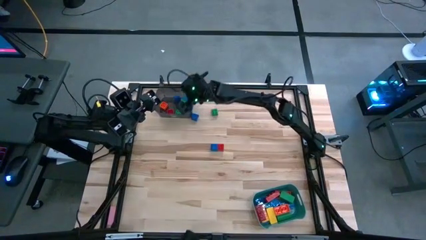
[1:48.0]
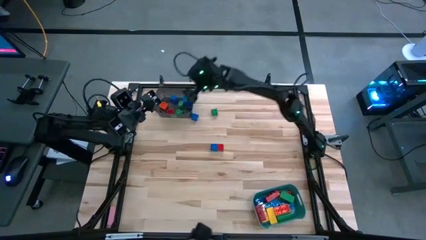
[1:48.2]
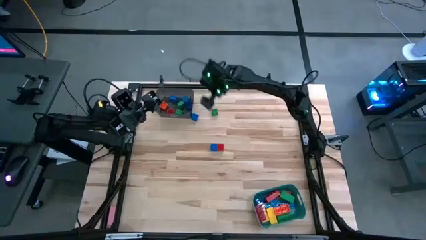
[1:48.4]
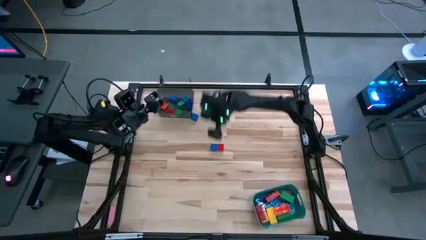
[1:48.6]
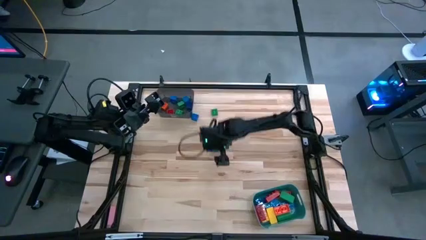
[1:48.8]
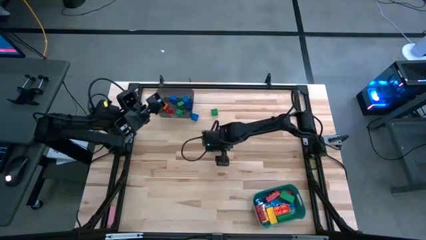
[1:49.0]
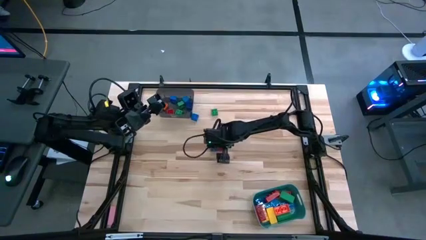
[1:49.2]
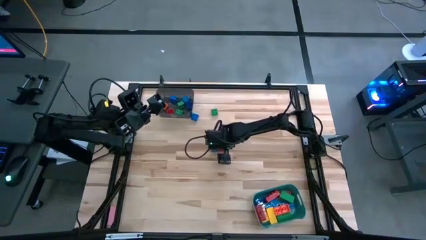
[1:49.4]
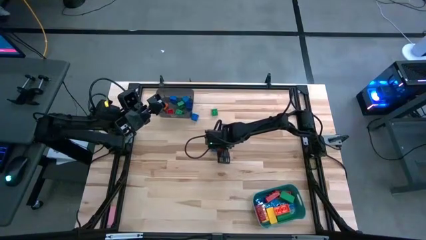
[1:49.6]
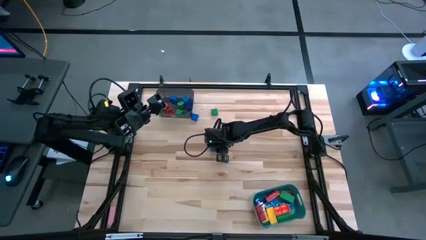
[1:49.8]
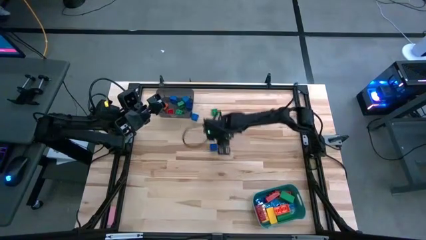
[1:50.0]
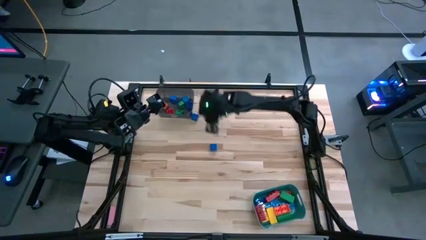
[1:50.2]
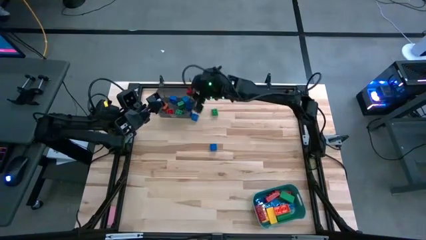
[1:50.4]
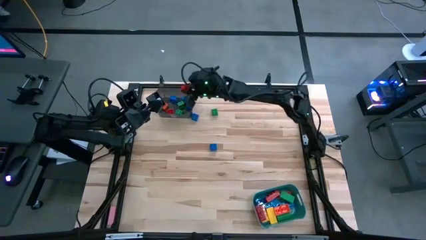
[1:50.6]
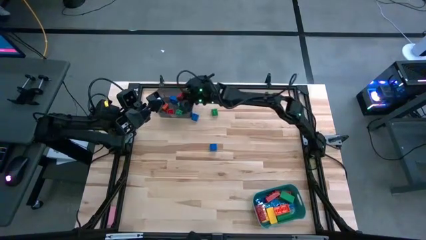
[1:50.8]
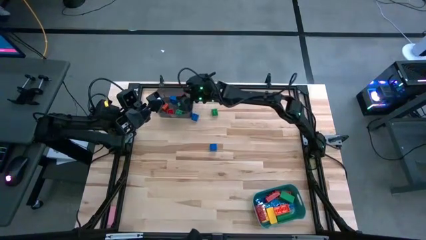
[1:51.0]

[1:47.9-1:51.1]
Task: Sort blocks by size
Put the red game piece into the black bin

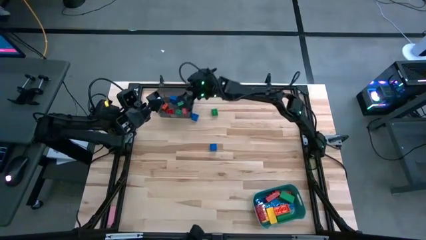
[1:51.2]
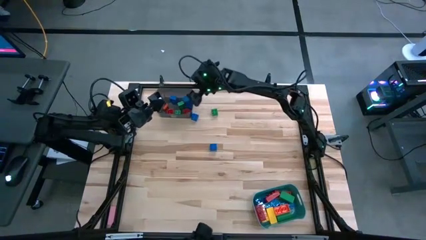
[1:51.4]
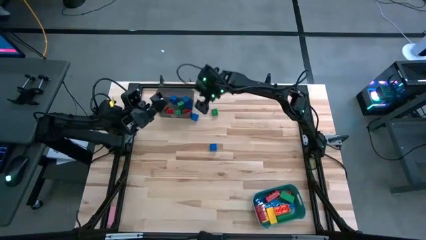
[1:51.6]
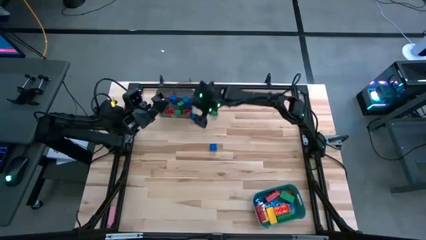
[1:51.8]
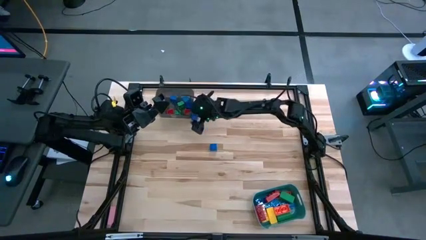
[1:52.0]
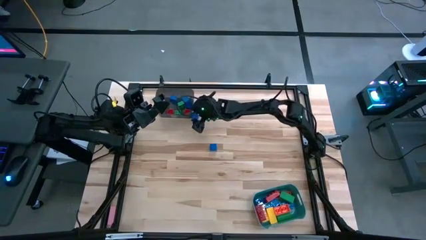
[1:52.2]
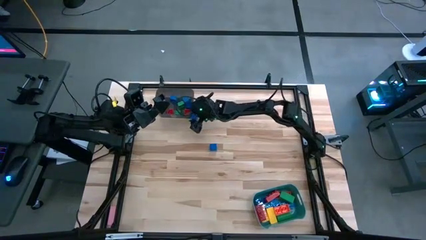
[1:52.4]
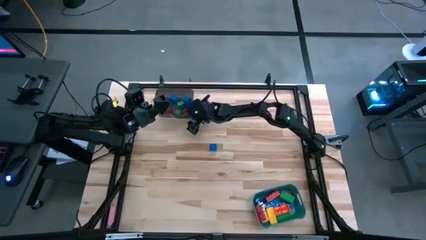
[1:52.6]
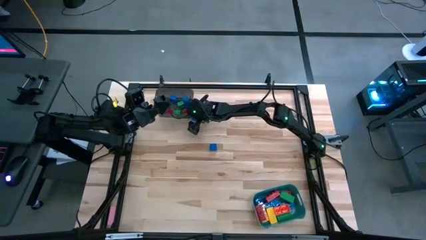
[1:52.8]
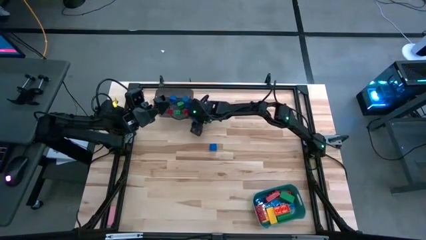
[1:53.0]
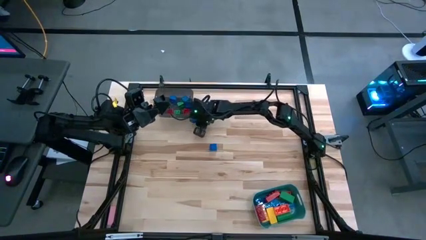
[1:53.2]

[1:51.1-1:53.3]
Put the top blue game piece into the black bin

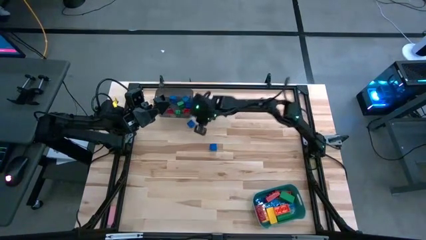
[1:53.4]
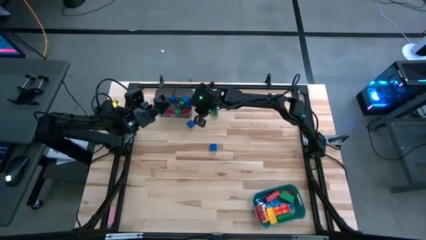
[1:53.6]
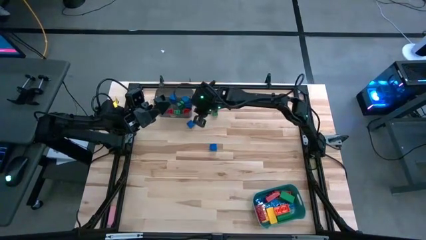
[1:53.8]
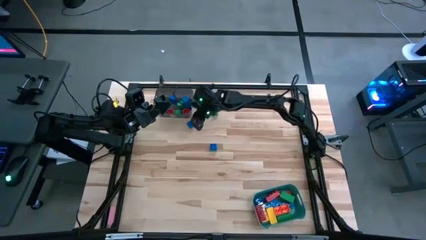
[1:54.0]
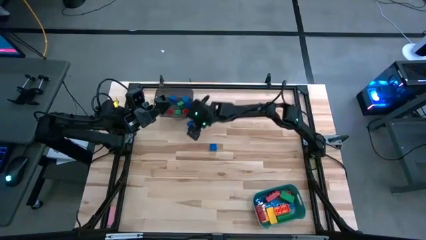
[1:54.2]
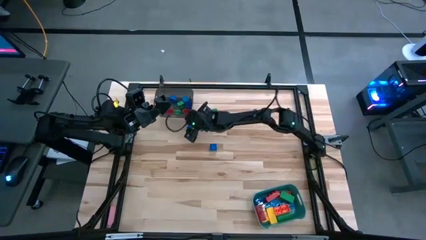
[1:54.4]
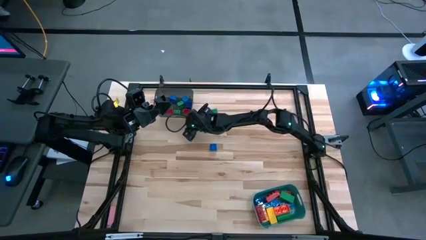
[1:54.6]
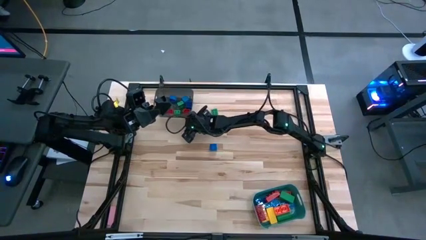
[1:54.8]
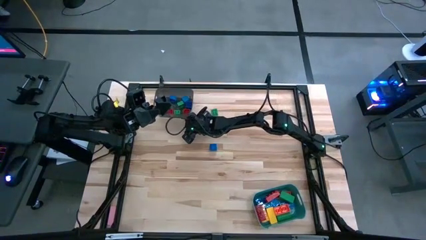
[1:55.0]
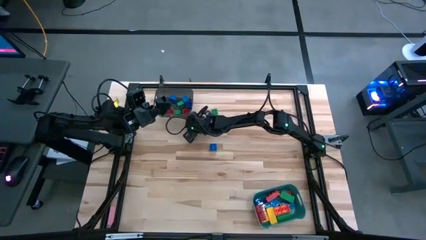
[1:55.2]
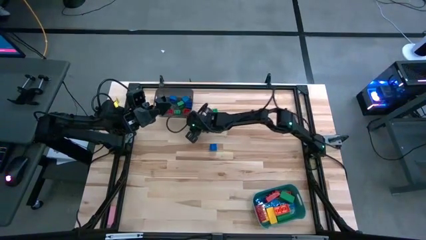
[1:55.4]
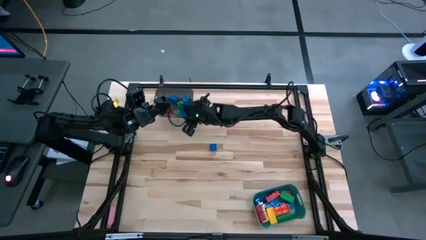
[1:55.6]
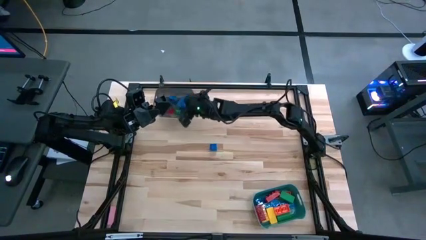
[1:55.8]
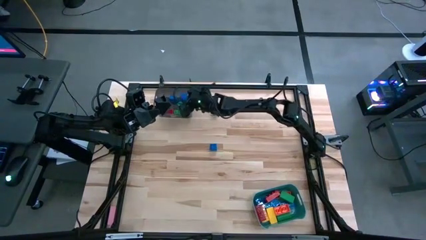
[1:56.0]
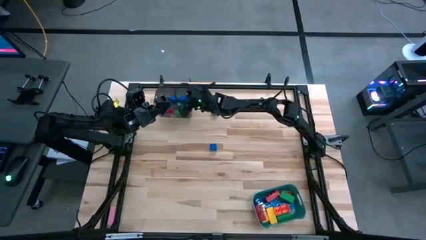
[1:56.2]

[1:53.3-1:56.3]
Put the top blue game piece into the black bin

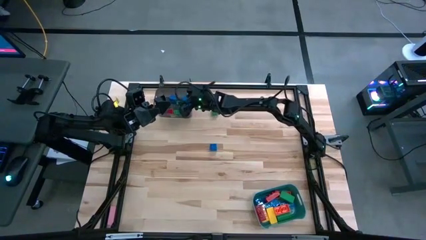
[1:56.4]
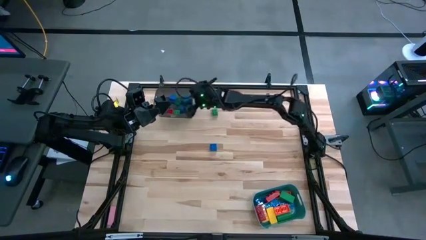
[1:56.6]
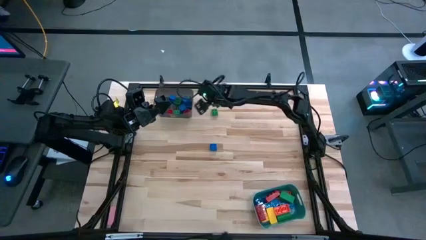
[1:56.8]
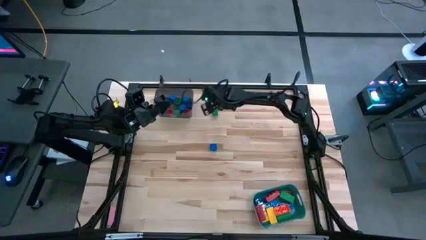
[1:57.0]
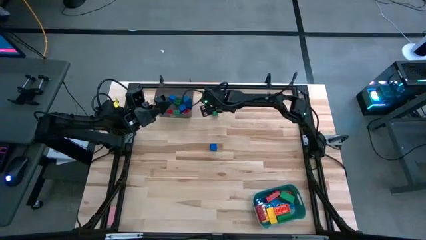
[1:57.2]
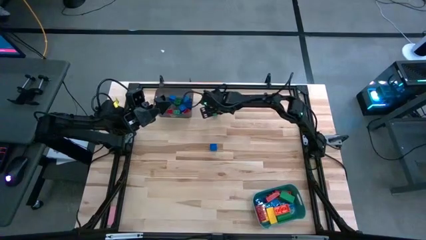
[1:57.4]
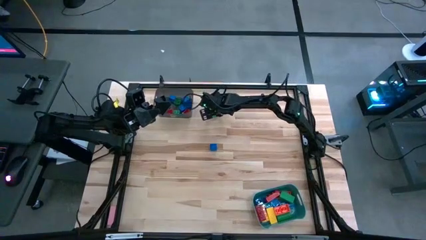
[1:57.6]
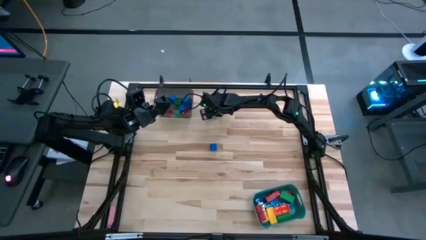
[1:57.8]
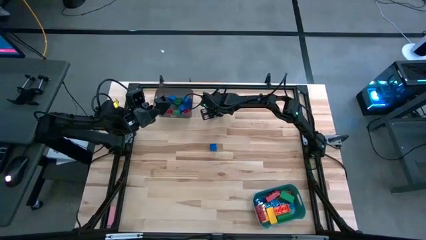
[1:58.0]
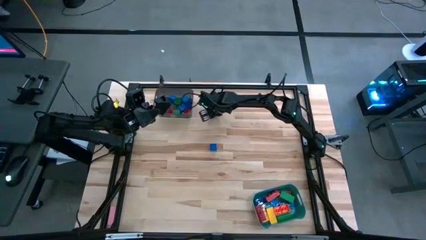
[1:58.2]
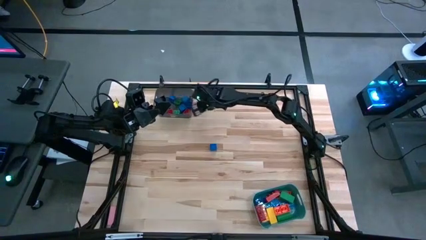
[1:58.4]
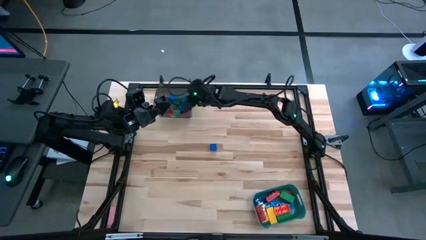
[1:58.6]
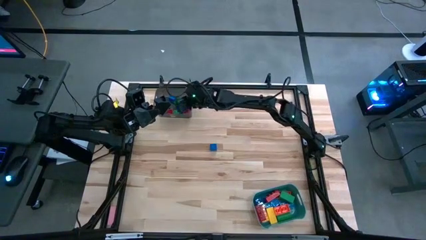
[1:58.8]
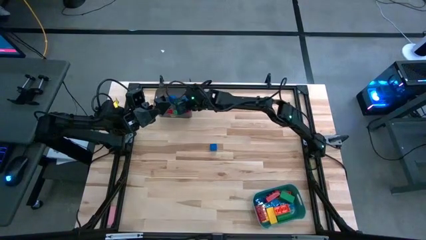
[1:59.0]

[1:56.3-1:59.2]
Put the green game piece into the black bin

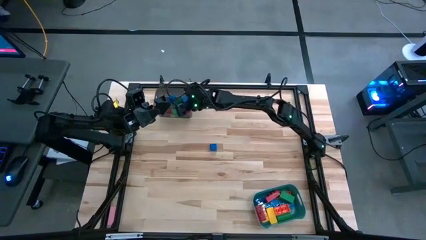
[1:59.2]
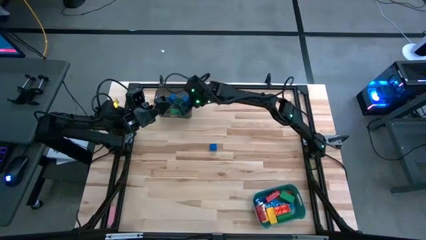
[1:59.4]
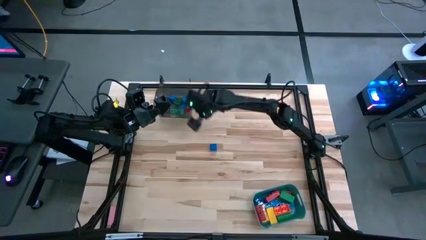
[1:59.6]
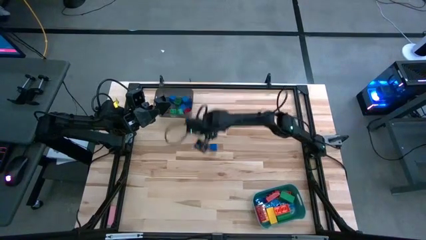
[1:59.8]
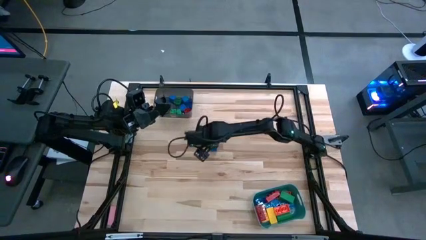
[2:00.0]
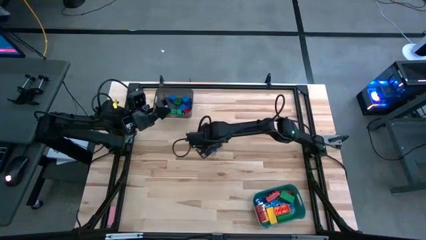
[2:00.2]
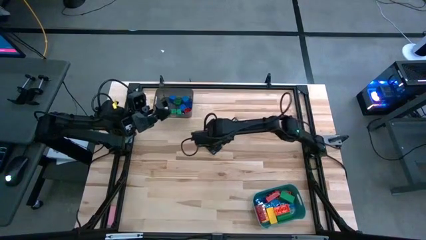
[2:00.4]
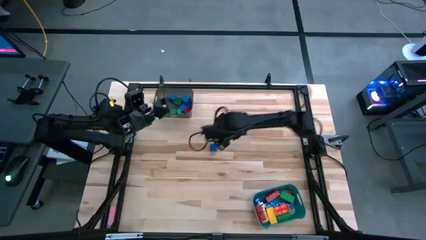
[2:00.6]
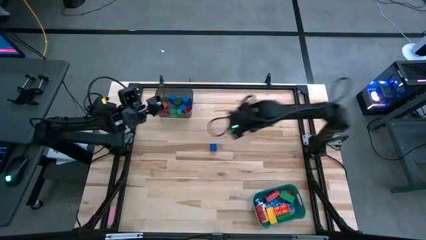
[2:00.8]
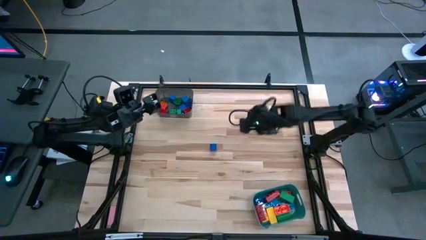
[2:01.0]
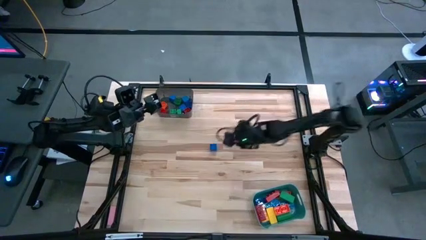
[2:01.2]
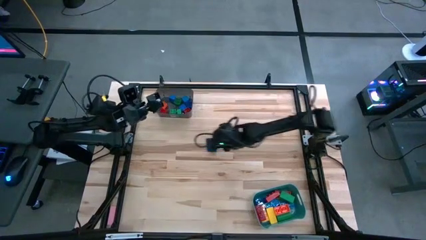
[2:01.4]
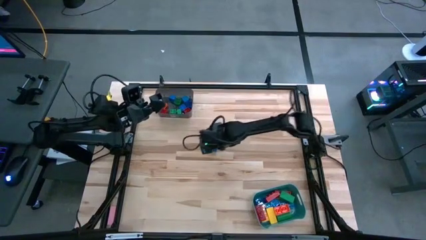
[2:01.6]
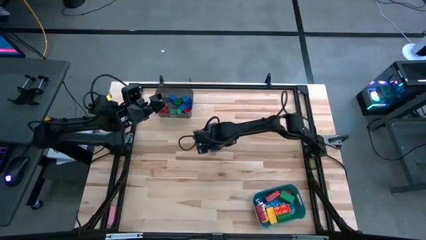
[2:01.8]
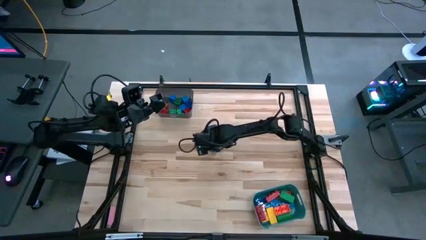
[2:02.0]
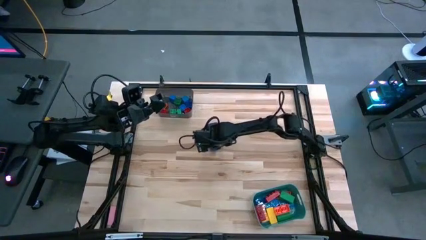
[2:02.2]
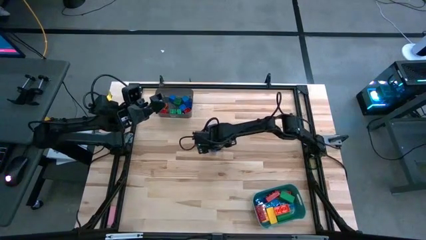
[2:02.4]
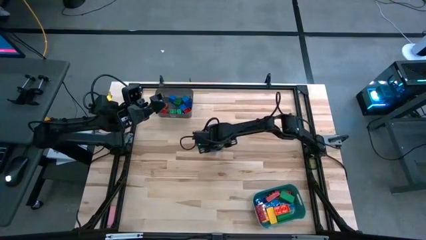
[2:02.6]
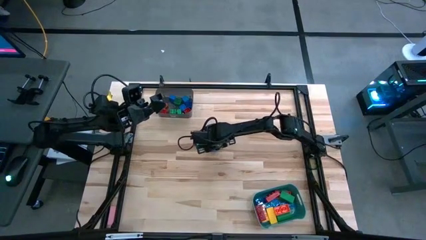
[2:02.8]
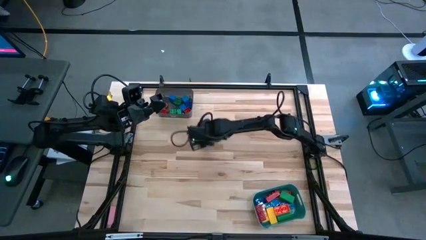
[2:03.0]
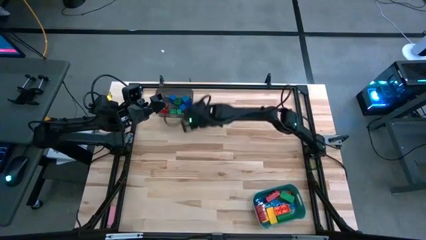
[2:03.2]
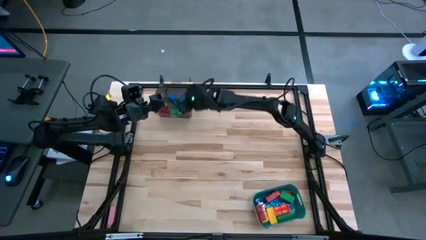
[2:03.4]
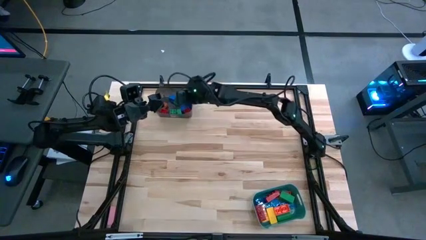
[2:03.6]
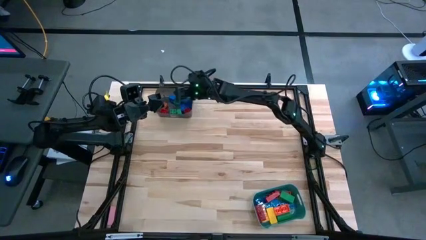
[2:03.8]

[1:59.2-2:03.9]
Put the blue game piece into the black bin

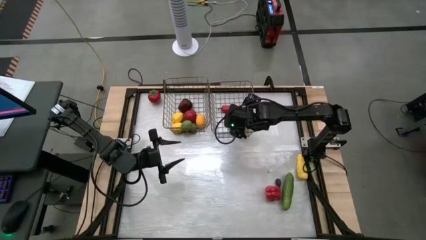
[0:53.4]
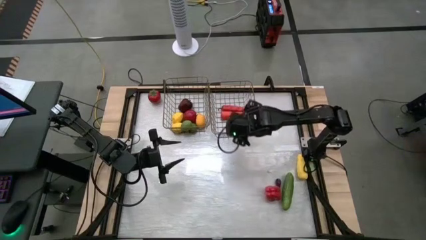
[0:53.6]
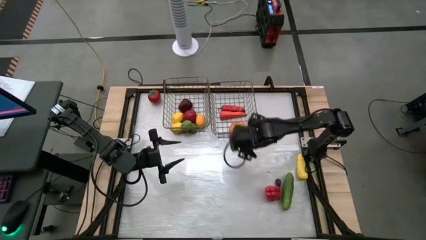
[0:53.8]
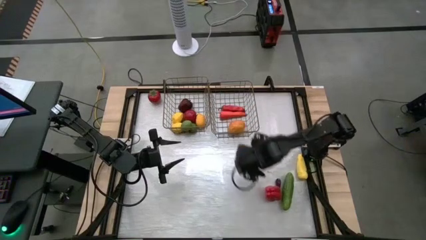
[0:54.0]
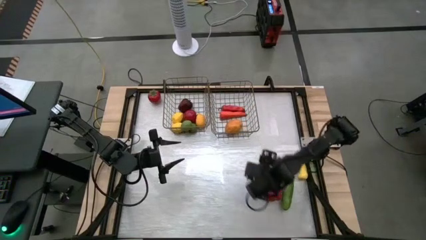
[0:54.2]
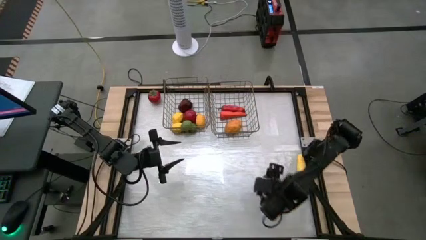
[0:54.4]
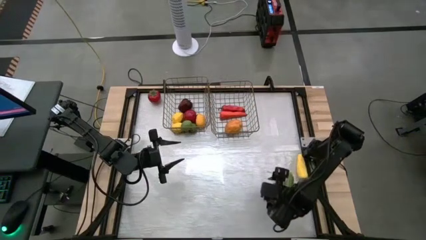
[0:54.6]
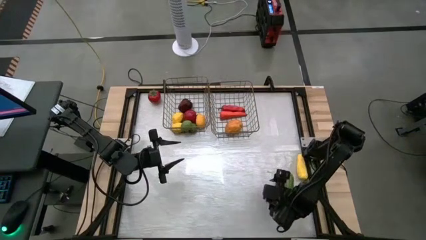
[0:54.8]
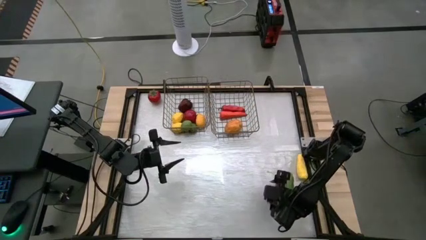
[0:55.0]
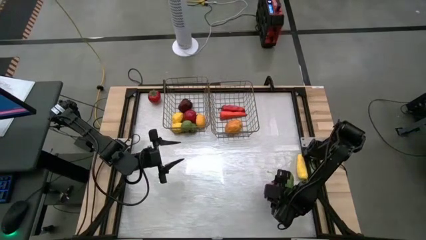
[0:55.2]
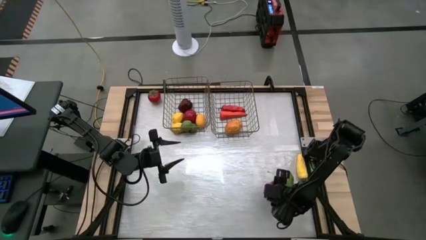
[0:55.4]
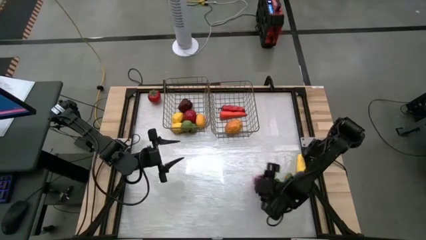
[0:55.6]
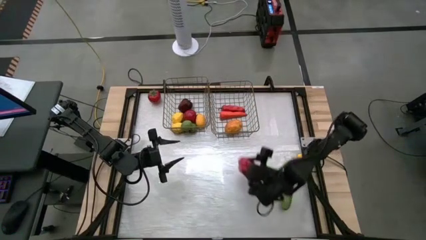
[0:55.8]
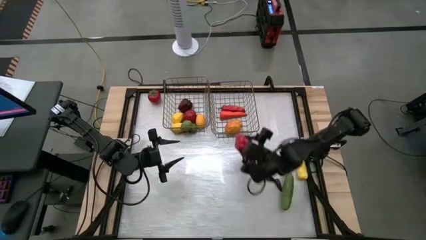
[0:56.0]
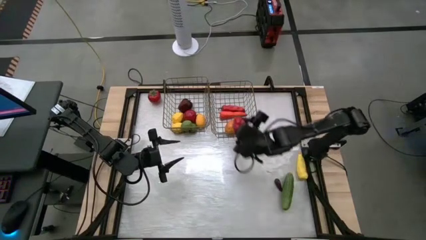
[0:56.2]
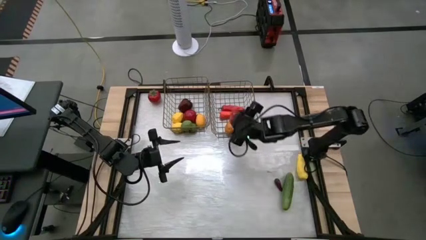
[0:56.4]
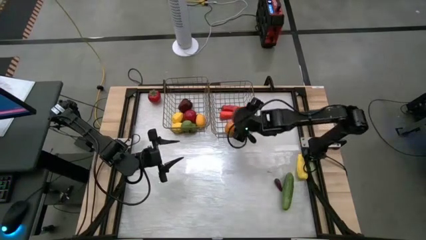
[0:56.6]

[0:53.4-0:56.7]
Task: Sort produce into baskets
Put the bell pepper into the right wire basket
